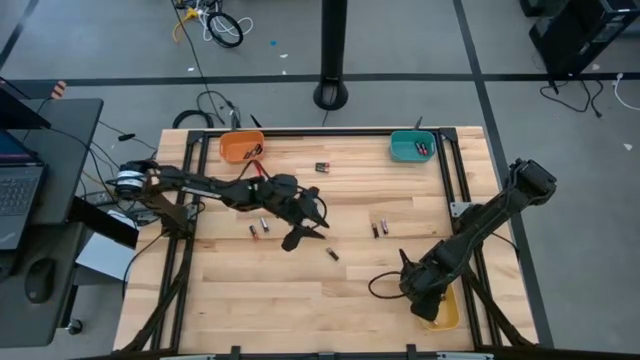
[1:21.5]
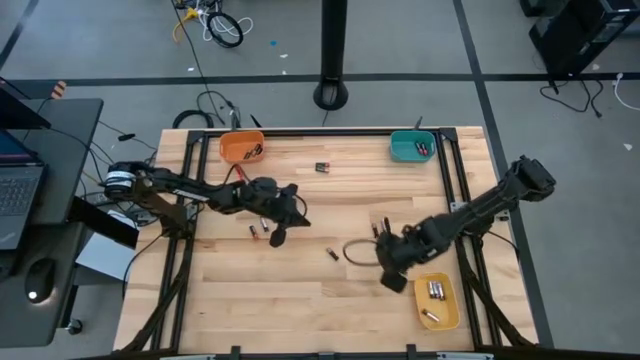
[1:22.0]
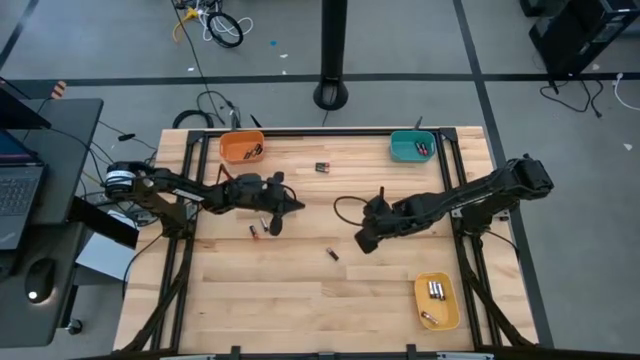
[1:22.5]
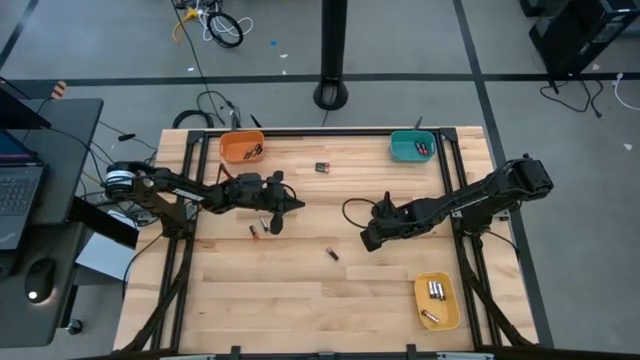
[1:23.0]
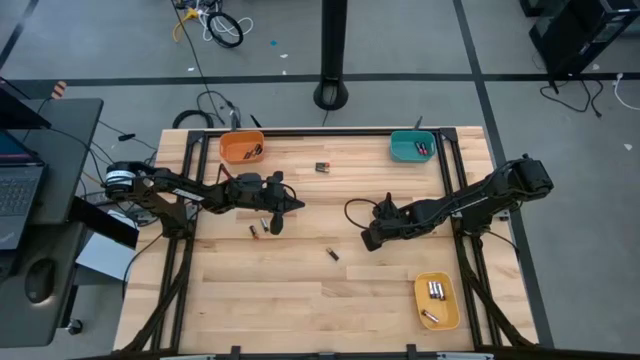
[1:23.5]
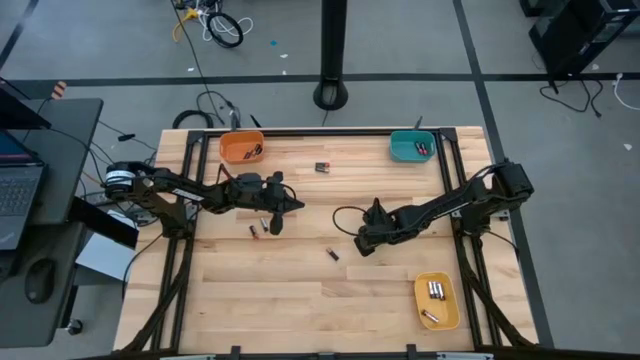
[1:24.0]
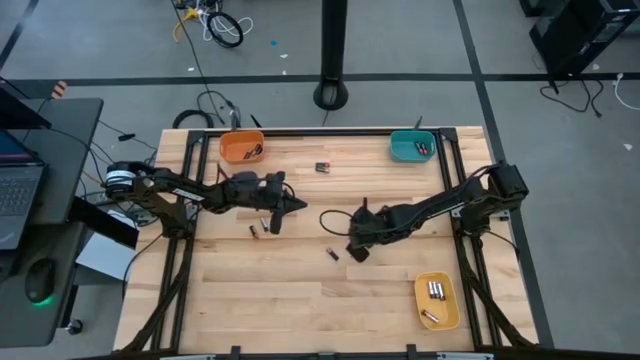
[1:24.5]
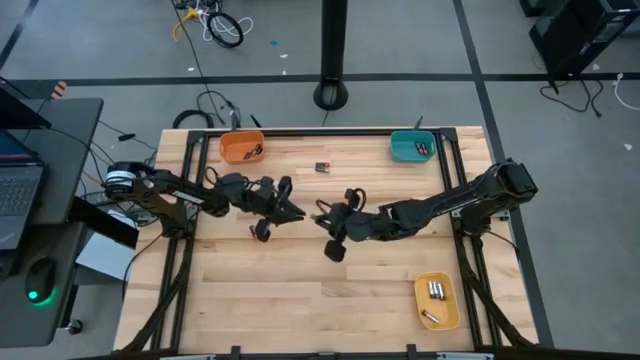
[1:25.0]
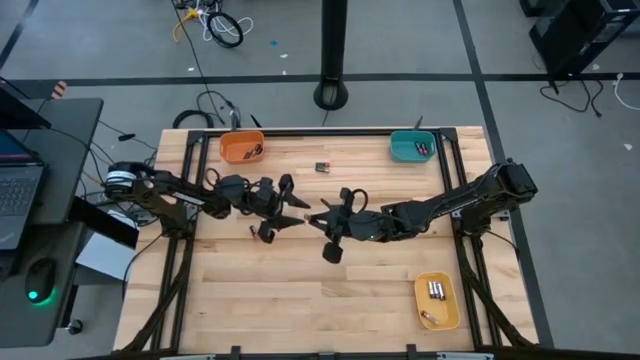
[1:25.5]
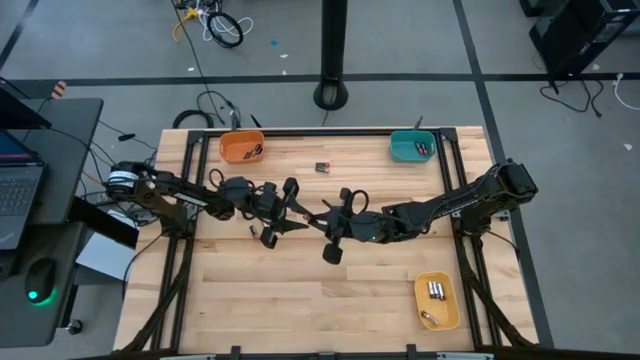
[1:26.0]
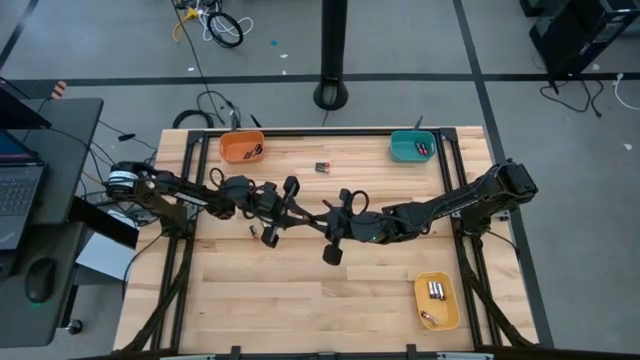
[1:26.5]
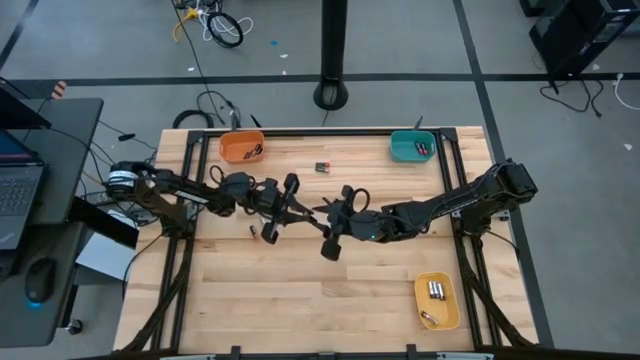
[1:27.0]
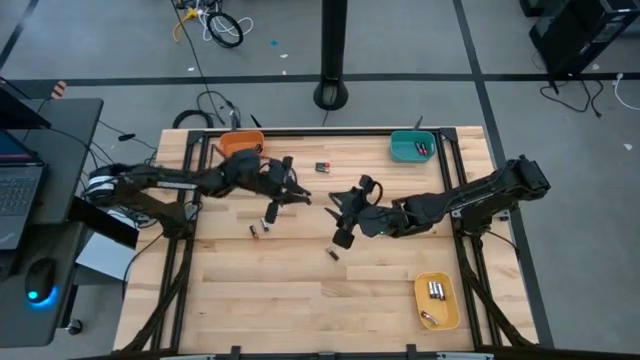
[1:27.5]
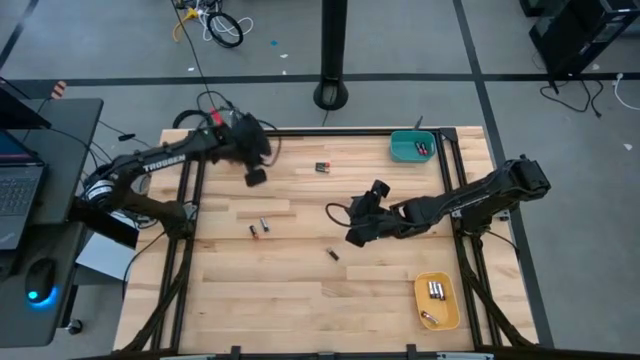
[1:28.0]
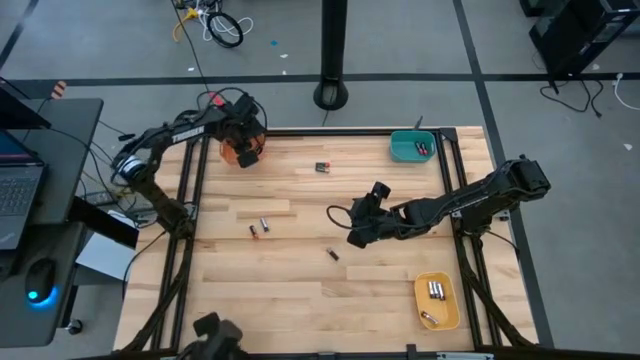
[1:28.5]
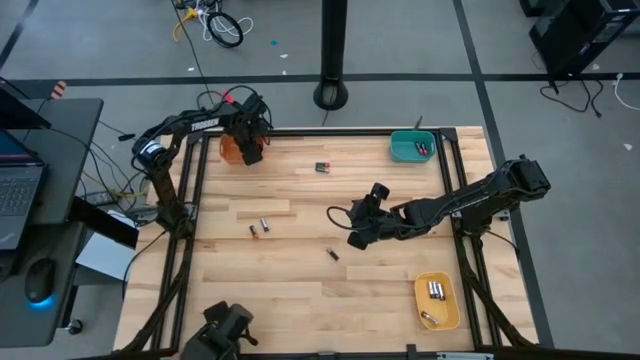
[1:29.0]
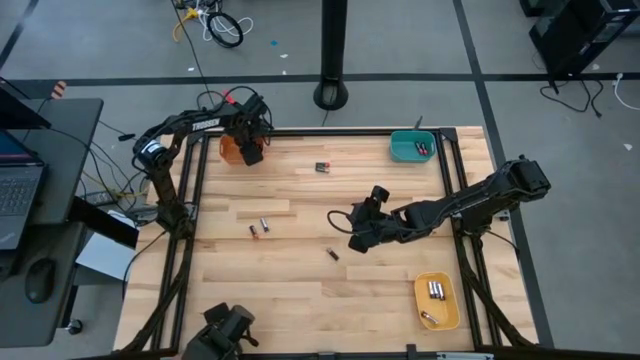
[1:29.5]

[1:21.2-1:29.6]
Task: Sort batteries
Put the black-orange battery into the orange bin

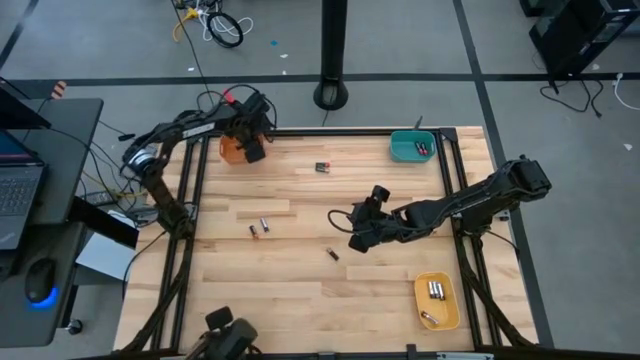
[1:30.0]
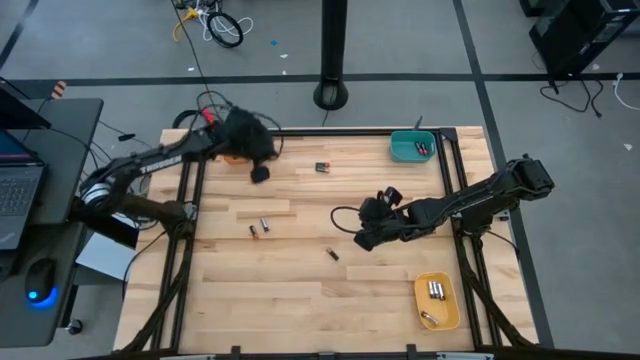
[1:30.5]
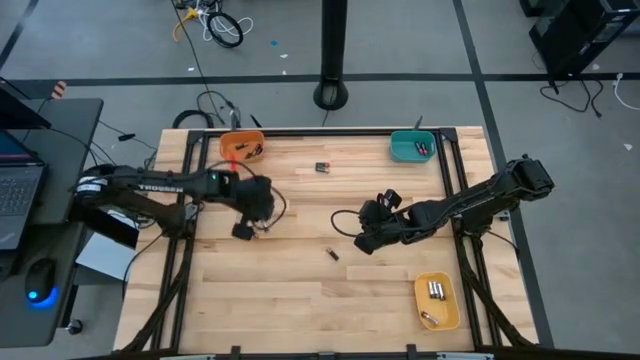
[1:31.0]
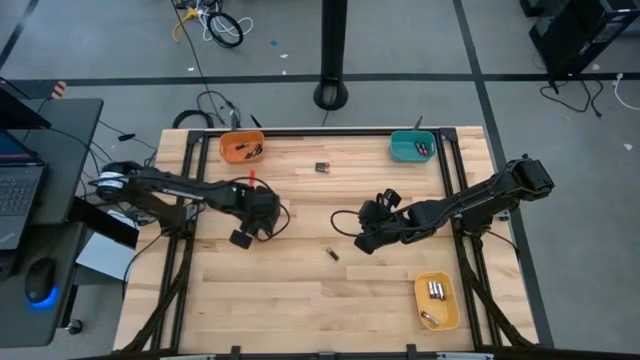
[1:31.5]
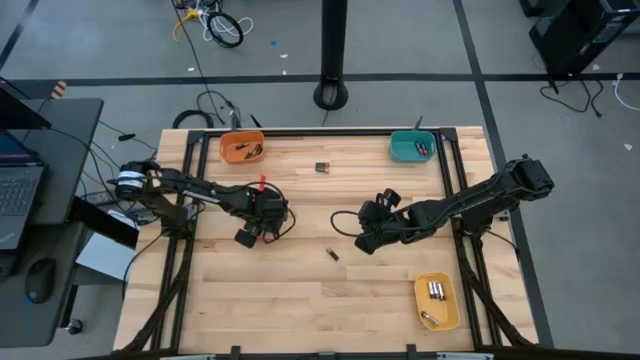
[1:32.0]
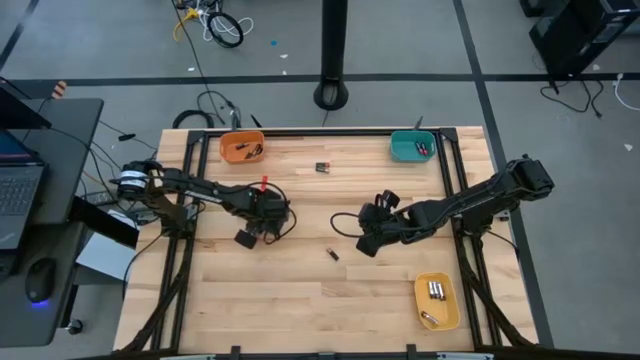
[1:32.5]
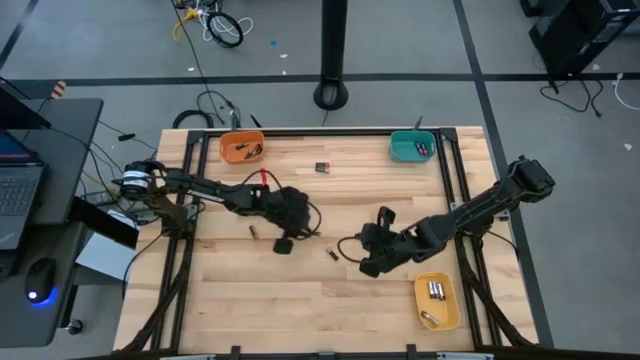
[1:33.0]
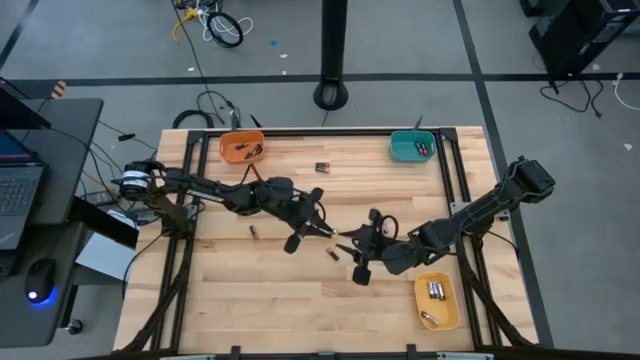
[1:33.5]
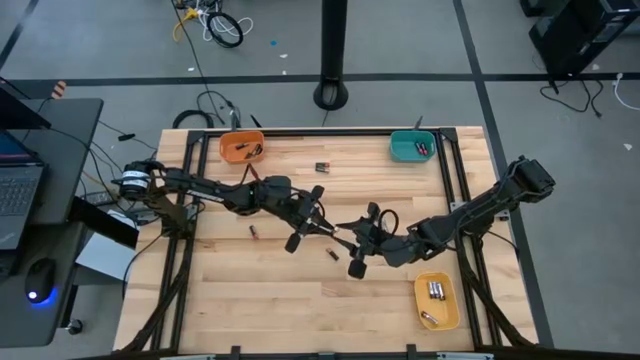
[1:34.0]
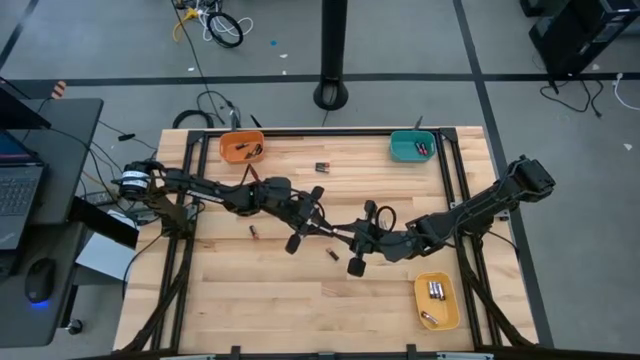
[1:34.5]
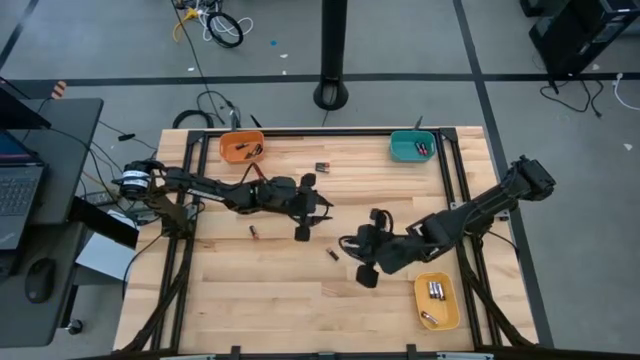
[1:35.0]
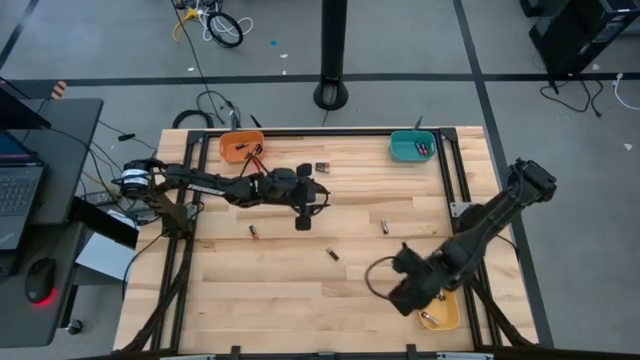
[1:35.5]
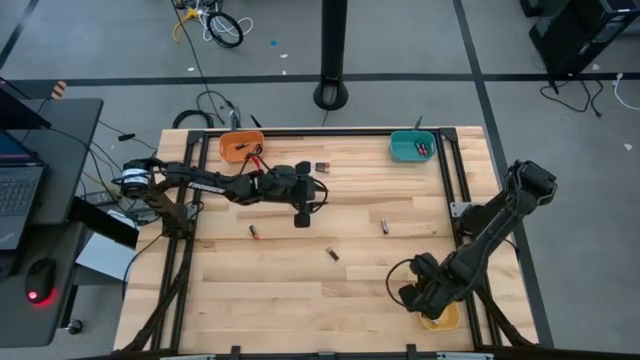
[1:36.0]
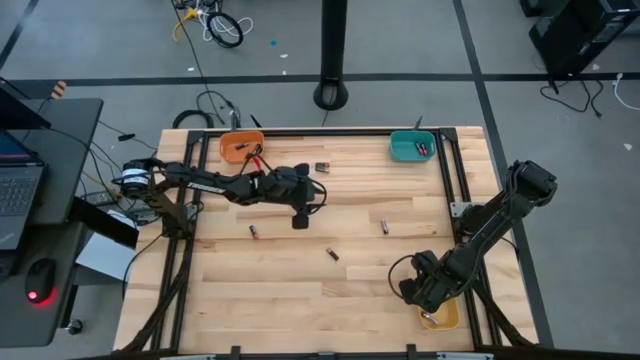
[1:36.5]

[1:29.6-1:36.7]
Put the silver battery into the yellow bin

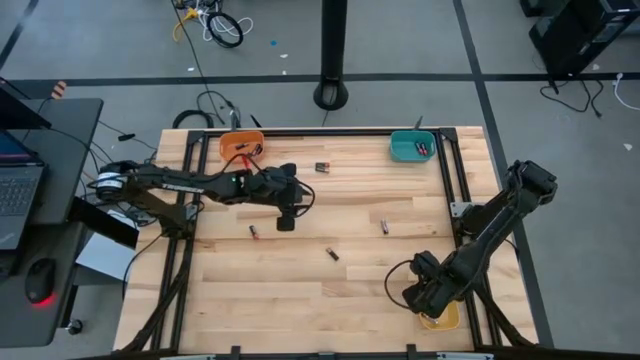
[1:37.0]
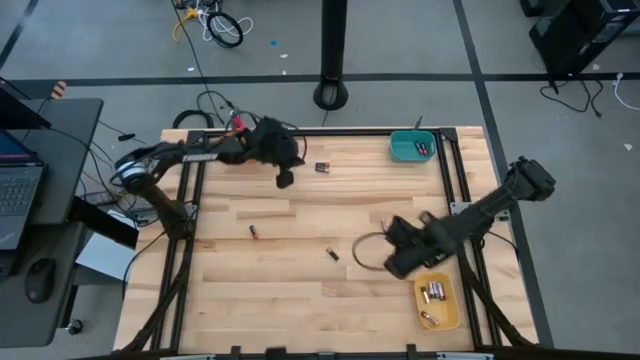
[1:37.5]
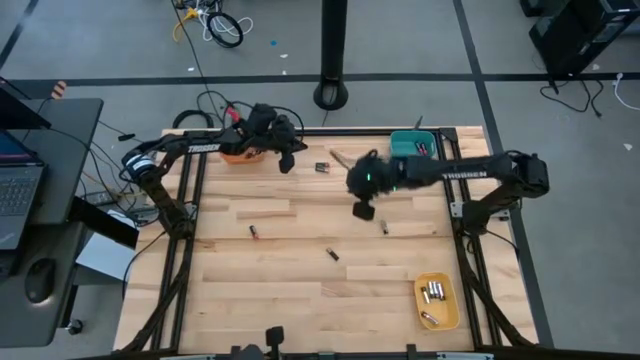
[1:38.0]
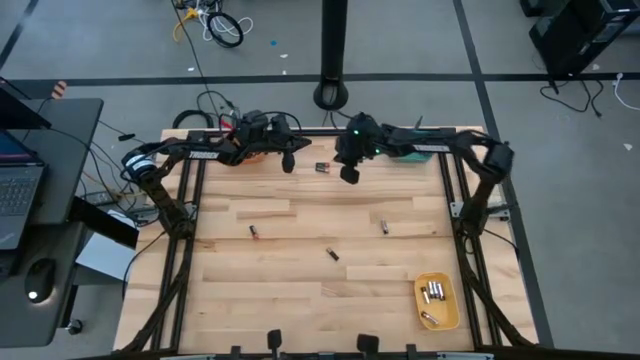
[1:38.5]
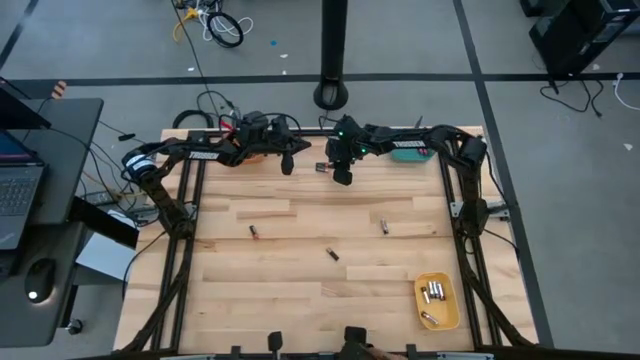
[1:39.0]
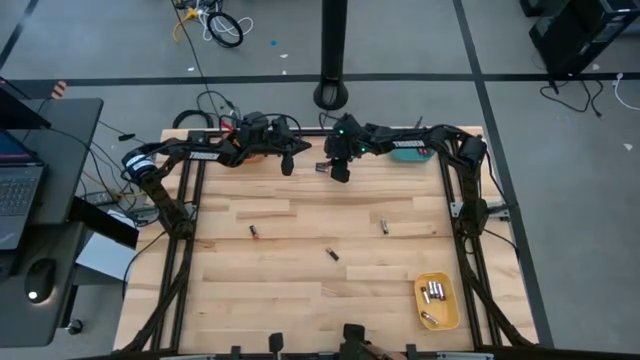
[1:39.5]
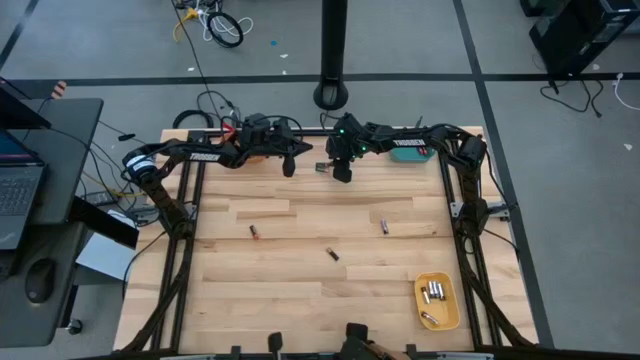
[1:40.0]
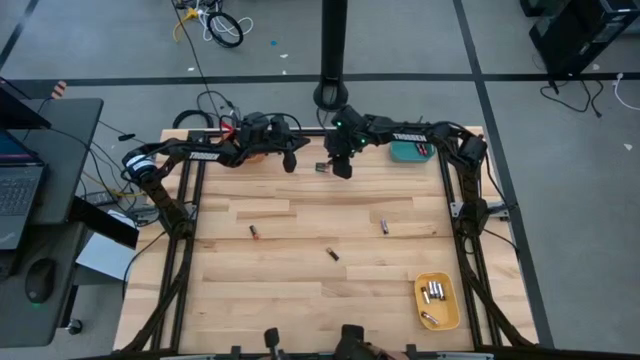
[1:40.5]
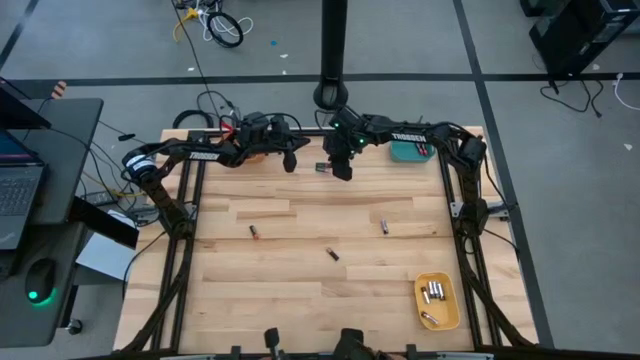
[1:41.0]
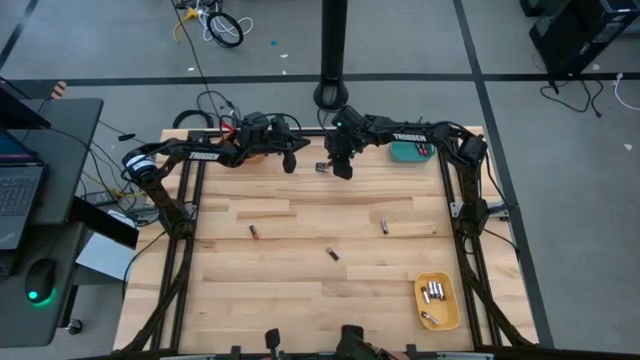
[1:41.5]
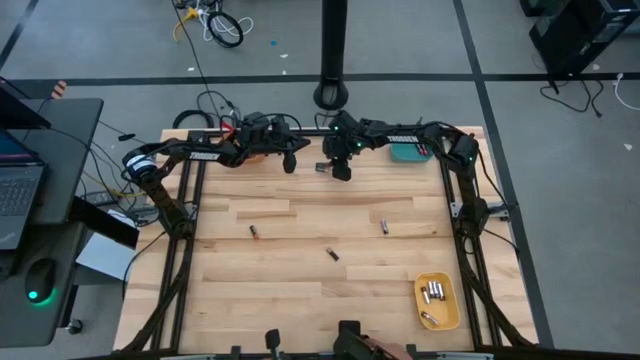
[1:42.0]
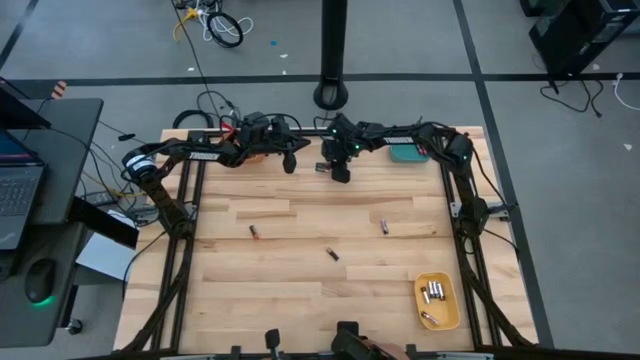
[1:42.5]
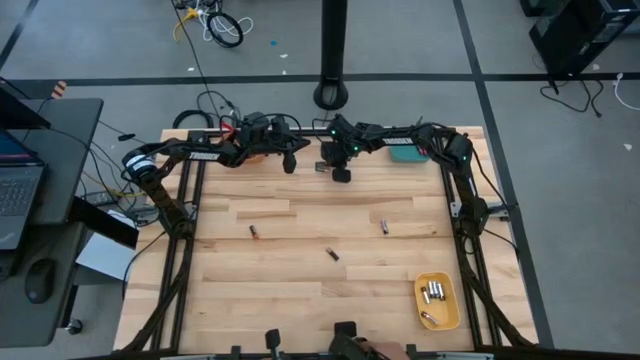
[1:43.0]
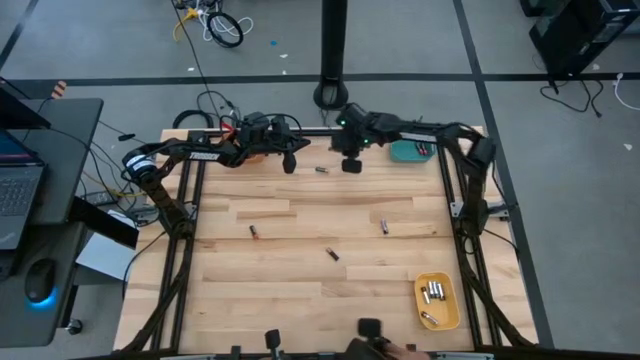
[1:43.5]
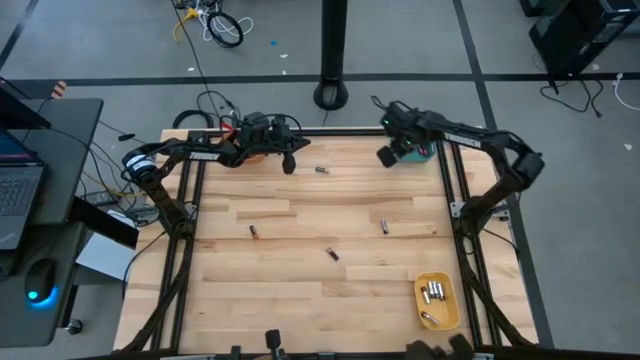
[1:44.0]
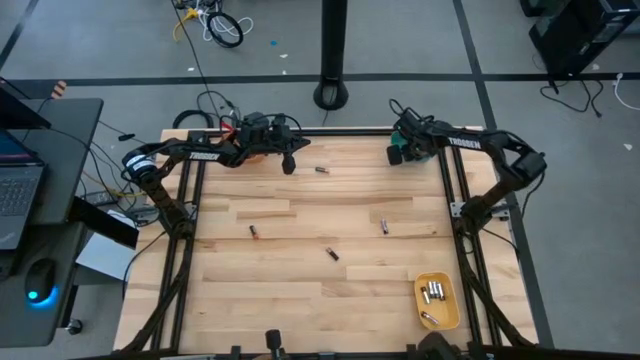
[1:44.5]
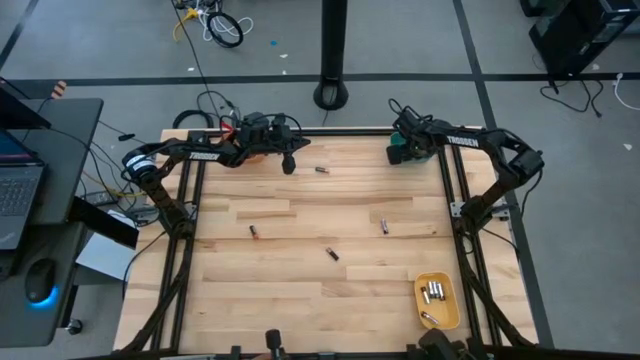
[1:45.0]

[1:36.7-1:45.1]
Put the black-red battery into the blue bin
